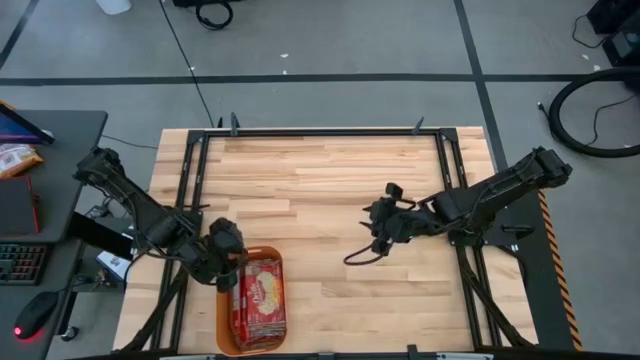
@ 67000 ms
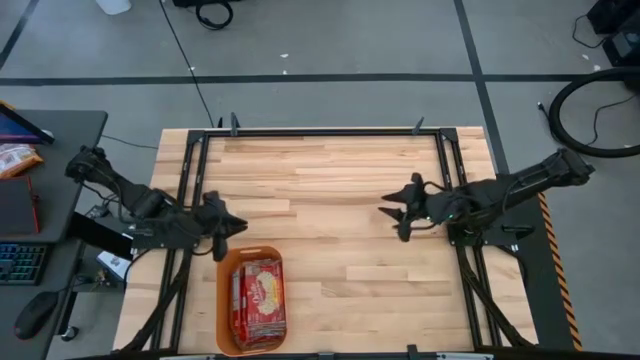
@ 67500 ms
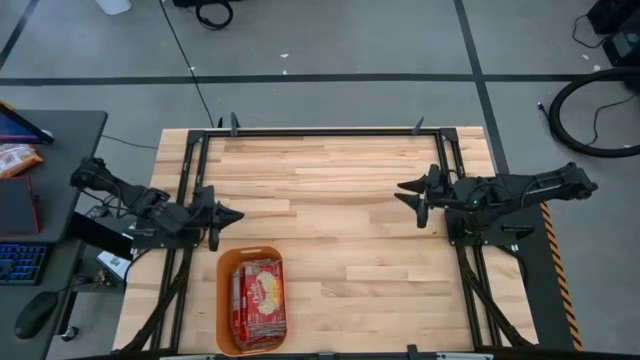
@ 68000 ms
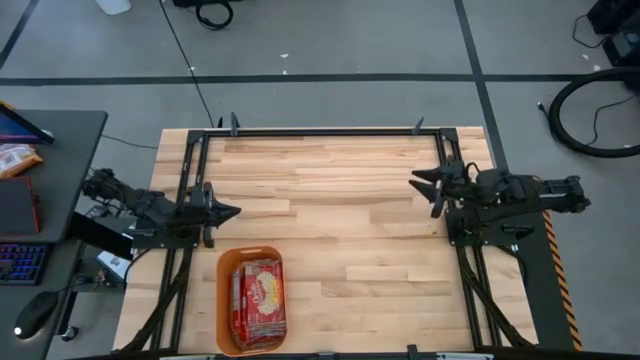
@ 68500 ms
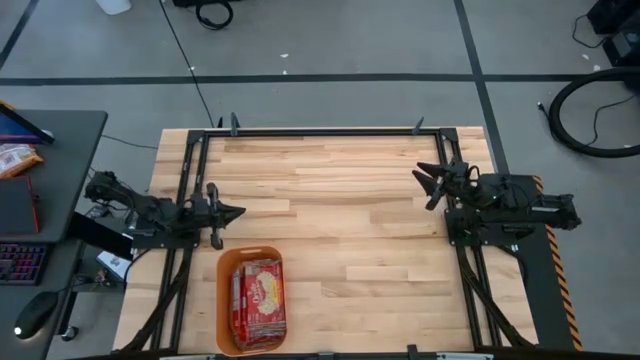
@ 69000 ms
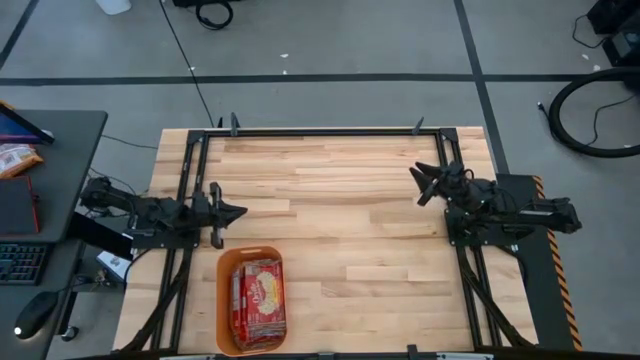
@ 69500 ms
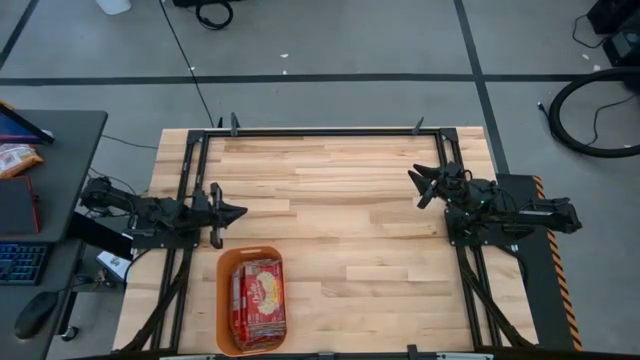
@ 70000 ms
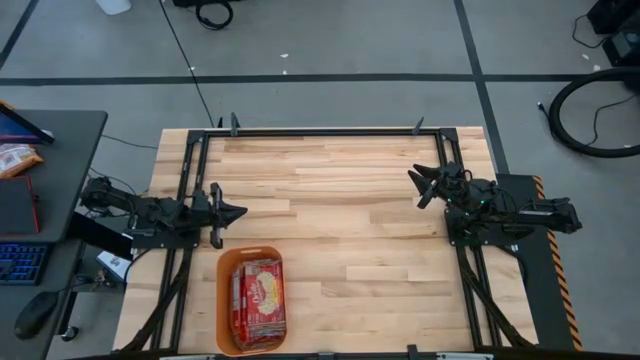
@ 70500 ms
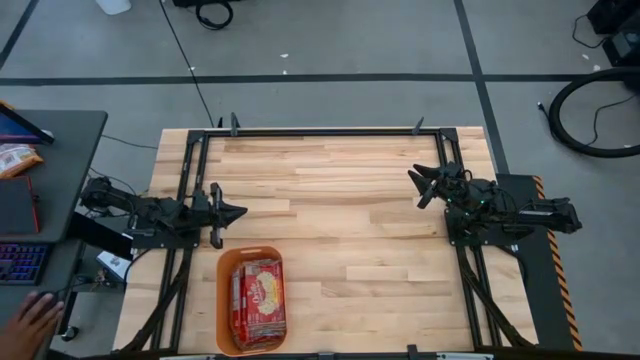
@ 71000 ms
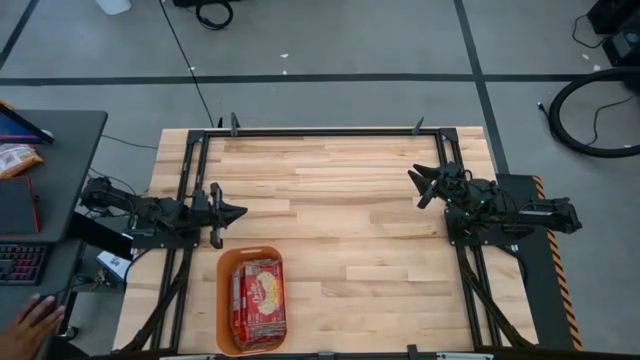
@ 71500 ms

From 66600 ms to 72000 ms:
Task: Sort popcorn bags into baskets
Return to Home Position

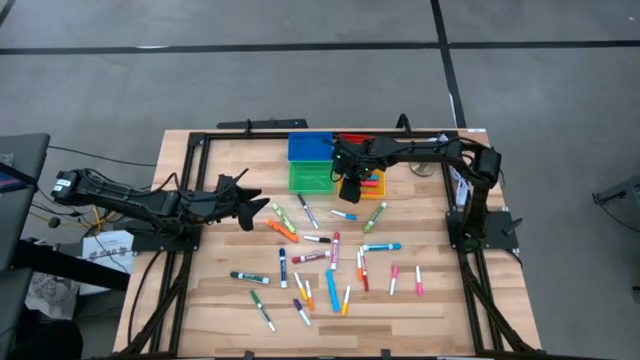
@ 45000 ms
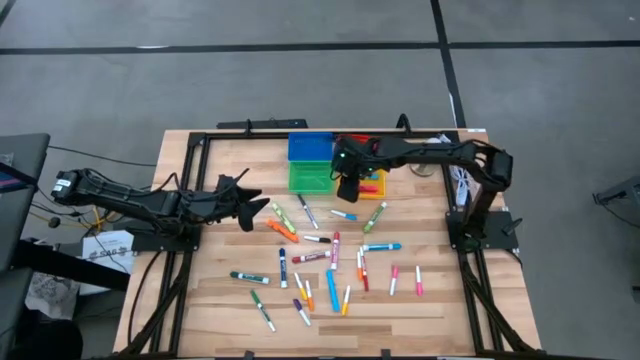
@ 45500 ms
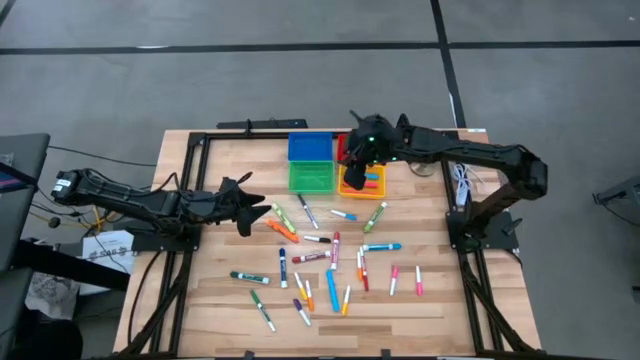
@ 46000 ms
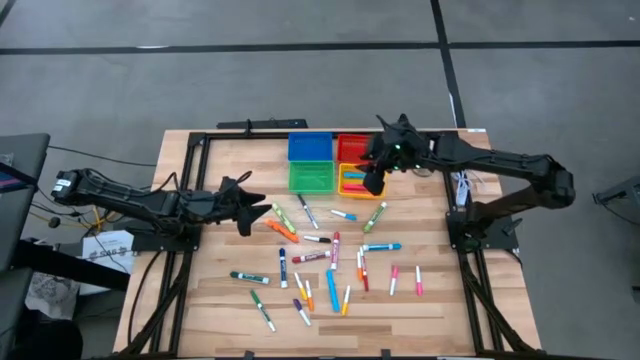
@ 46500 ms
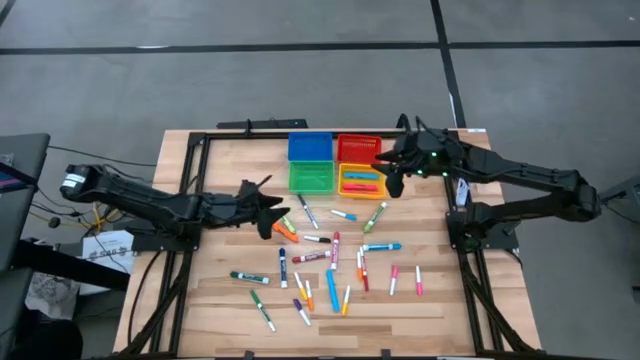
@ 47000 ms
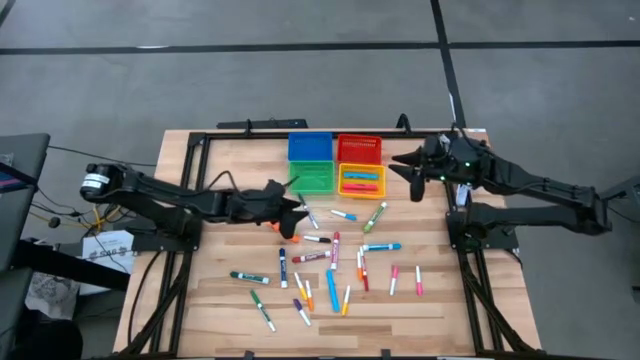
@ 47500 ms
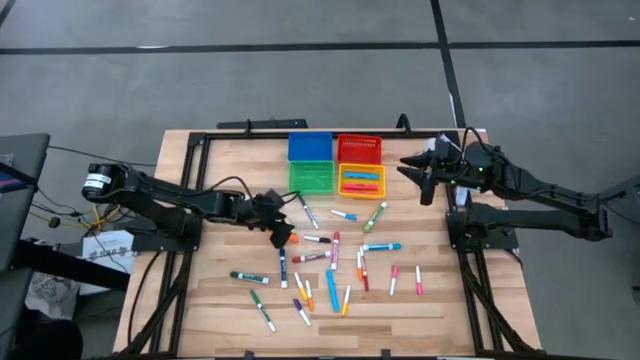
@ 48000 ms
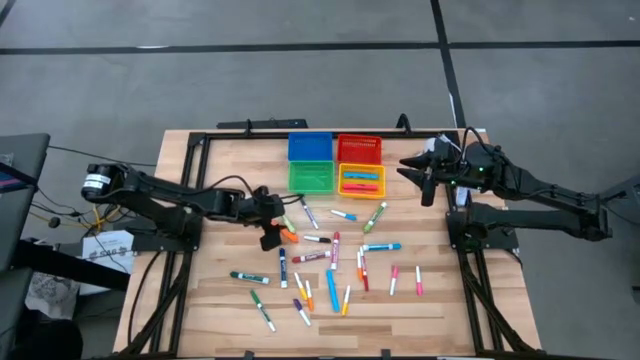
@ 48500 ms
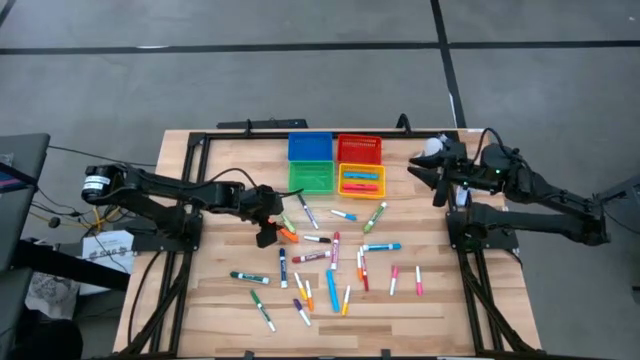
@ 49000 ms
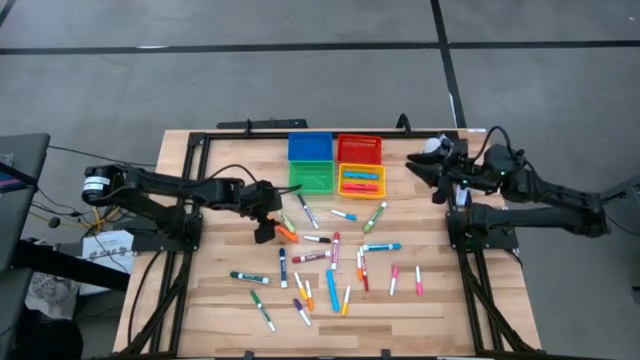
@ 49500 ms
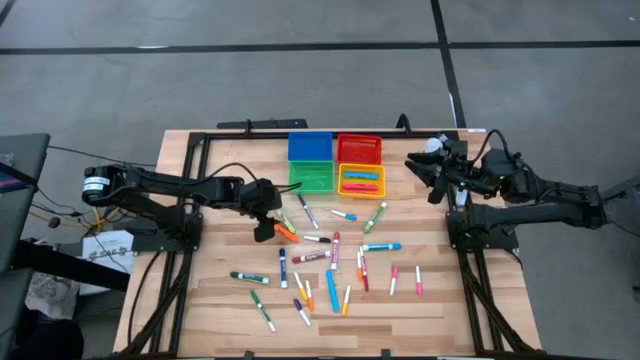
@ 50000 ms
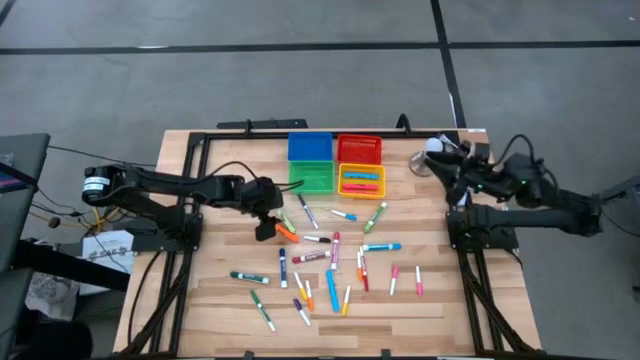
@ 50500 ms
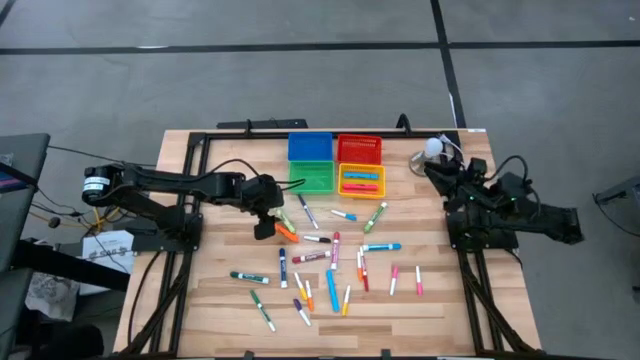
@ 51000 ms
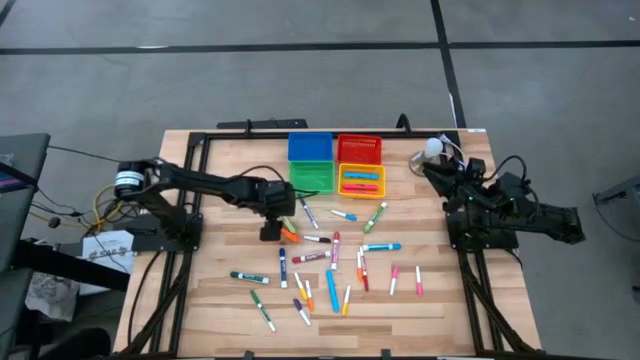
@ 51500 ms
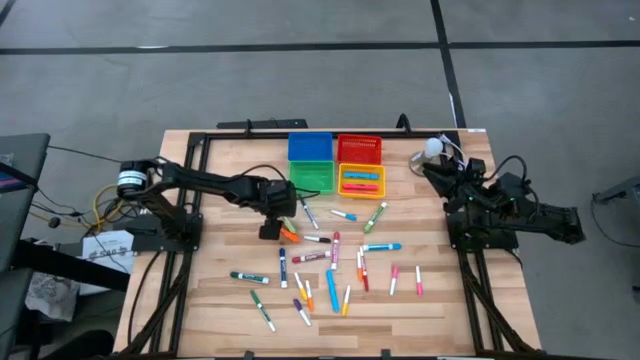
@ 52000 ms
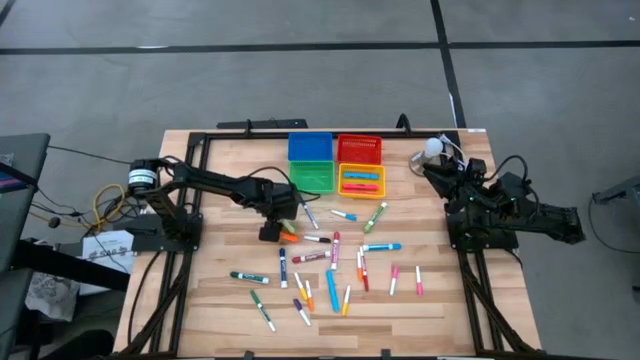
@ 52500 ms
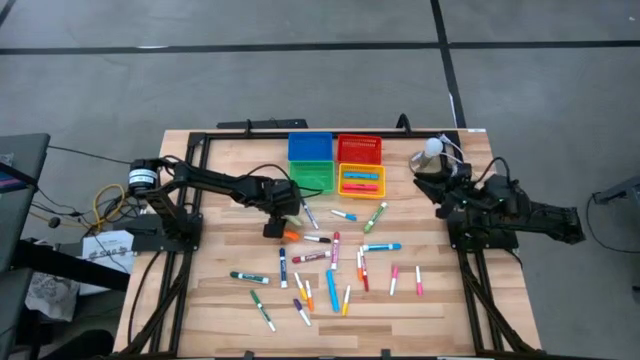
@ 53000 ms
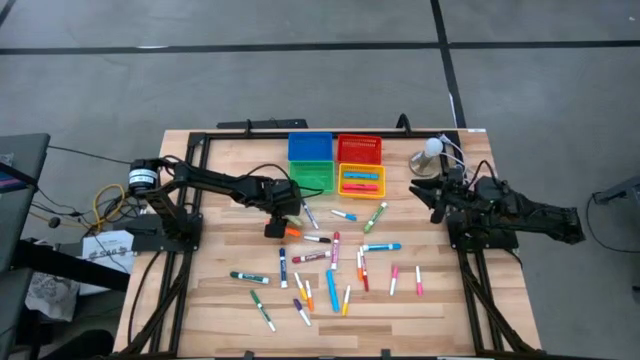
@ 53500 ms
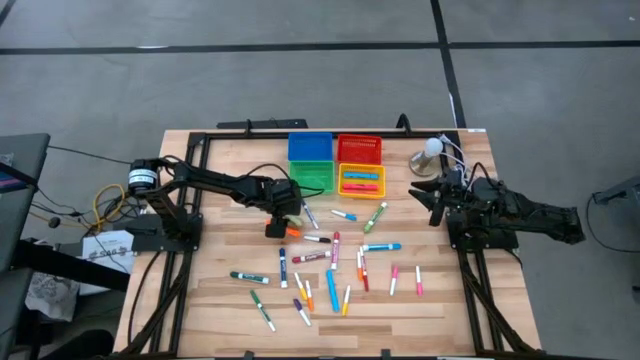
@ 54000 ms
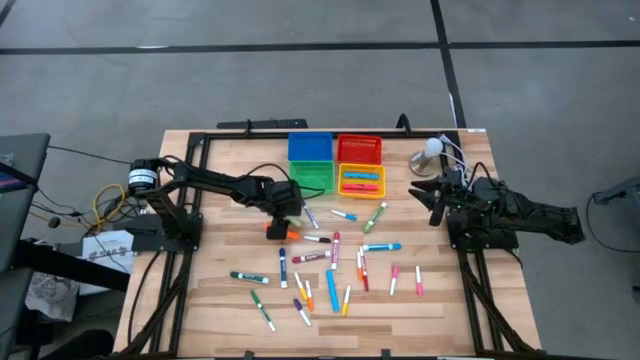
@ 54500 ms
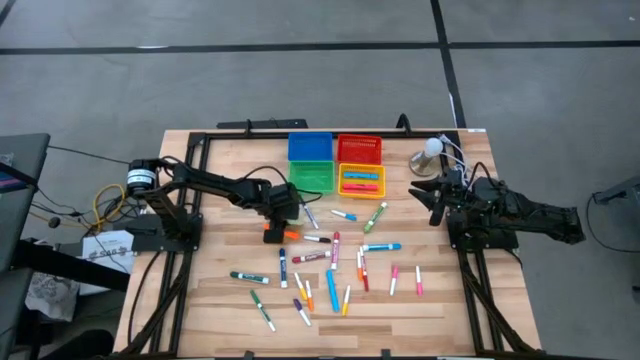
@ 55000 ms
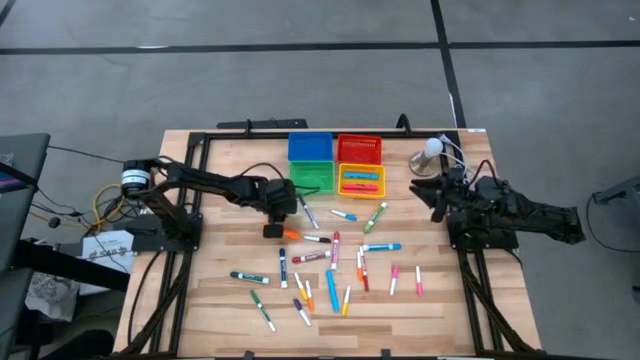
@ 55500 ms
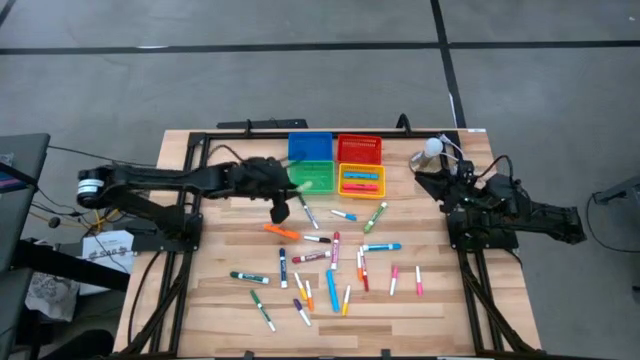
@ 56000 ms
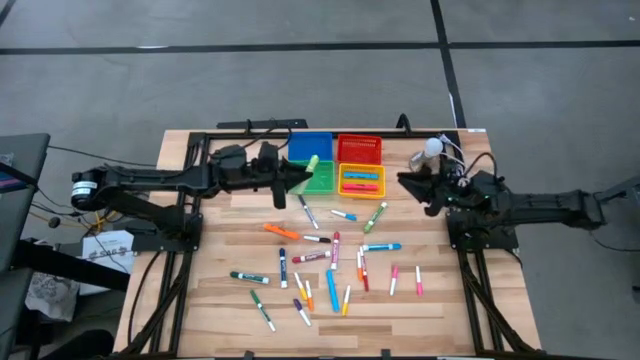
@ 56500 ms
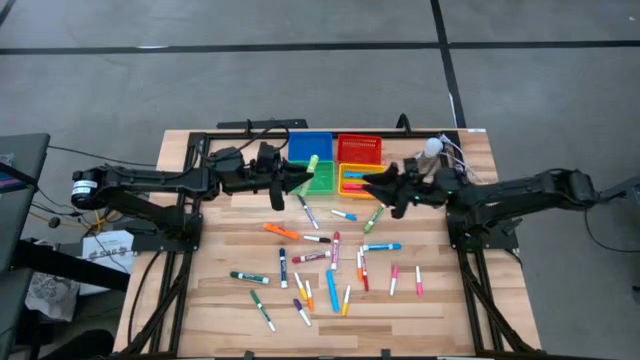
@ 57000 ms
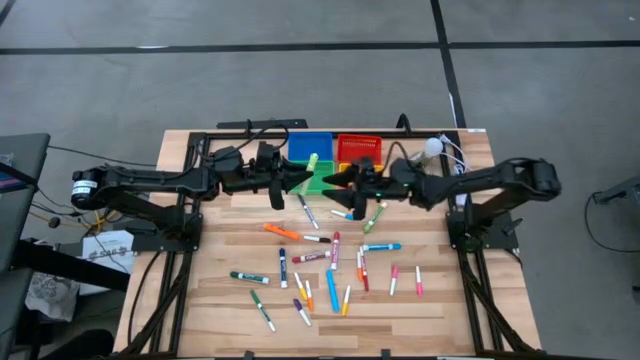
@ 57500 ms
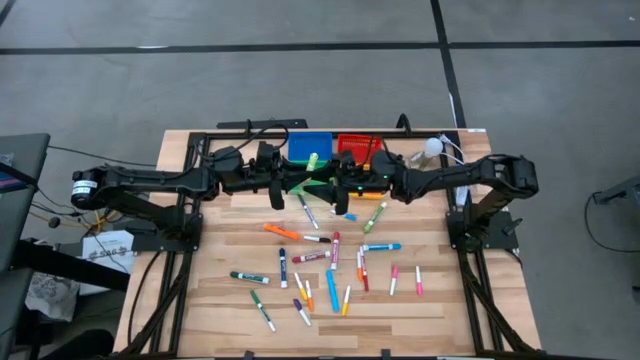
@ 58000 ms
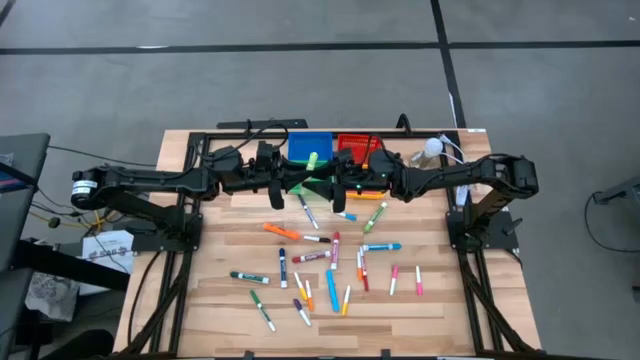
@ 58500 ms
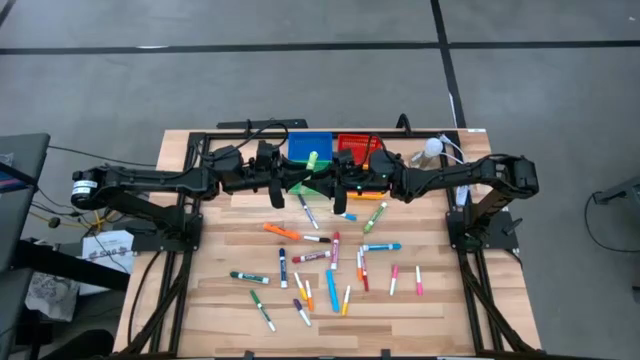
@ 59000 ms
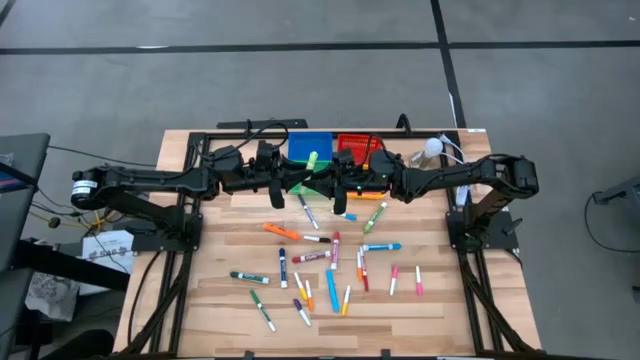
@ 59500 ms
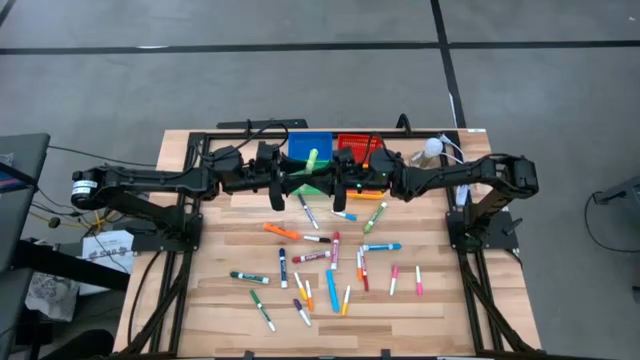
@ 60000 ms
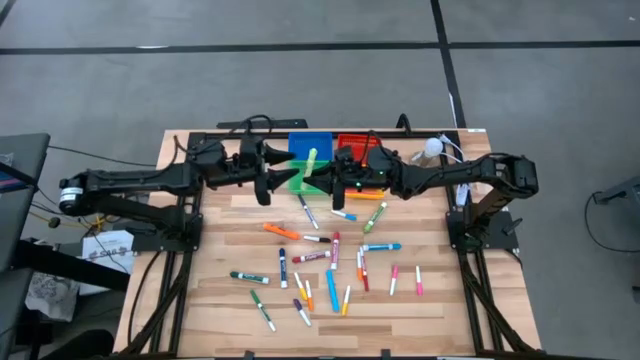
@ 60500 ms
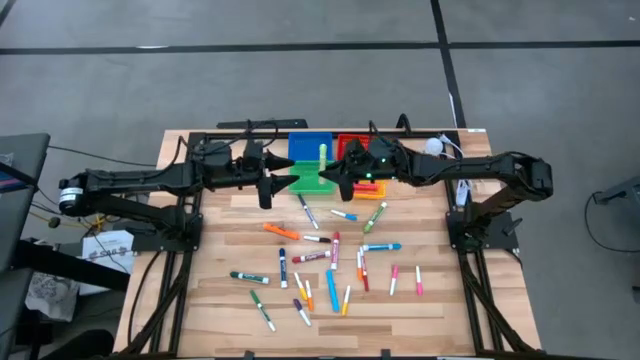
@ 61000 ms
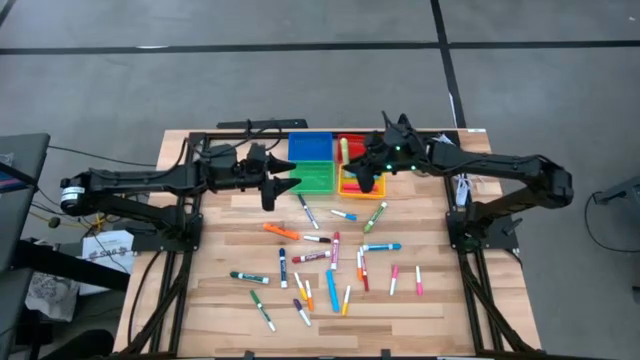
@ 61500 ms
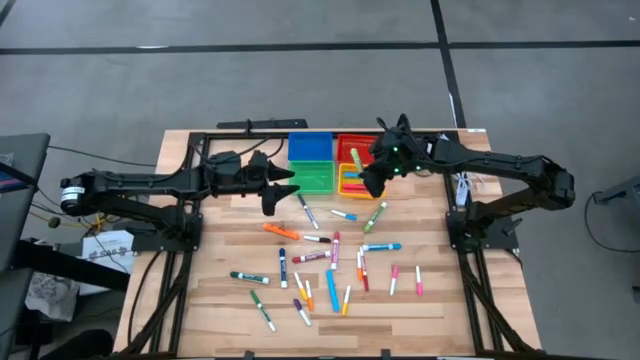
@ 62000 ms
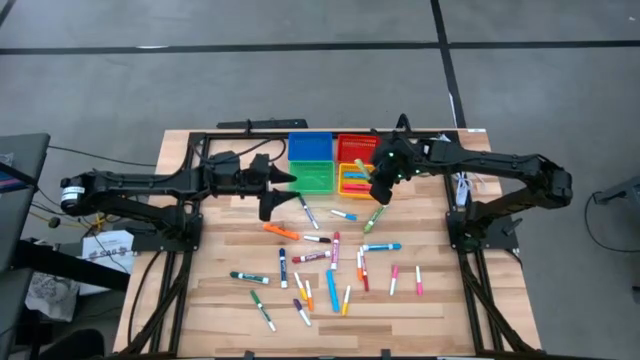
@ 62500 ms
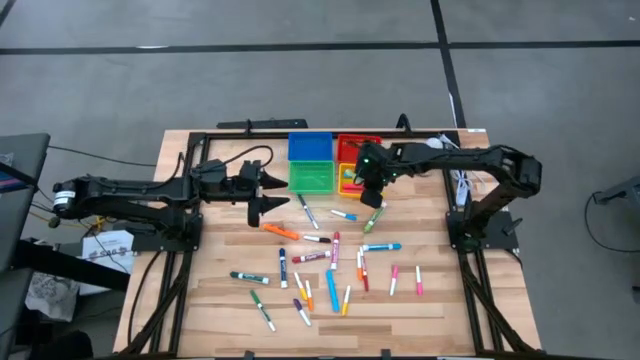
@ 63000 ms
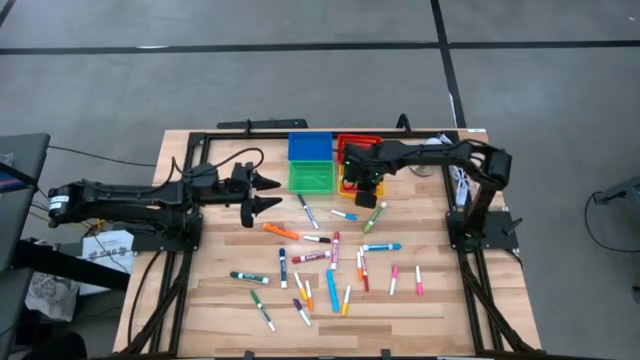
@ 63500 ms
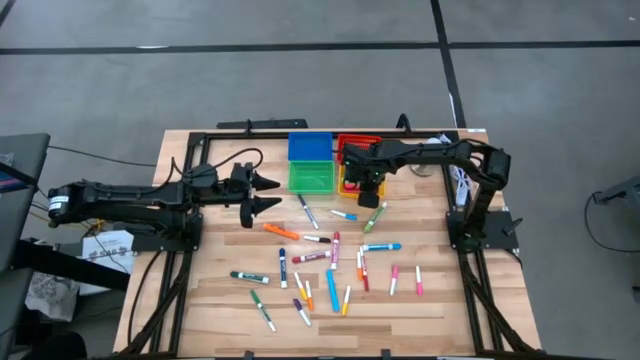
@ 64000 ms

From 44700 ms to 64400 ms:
Task: Pick & Place Markers
Put the light green highlighter pen into the yellow bin
